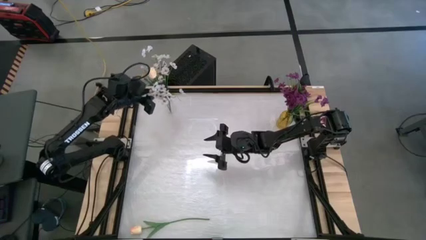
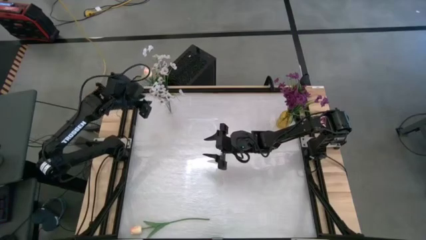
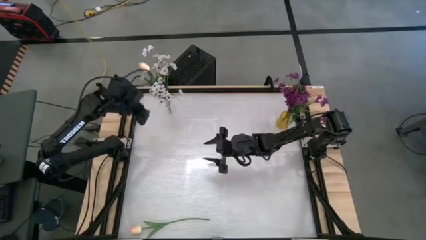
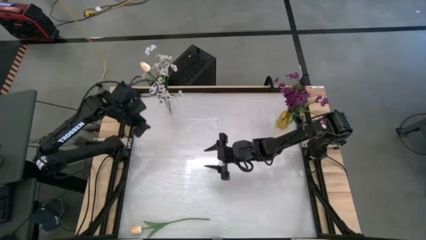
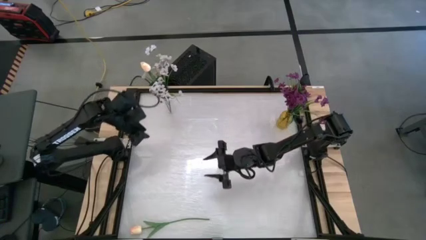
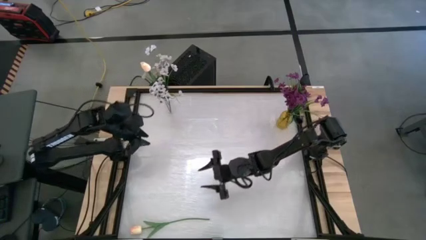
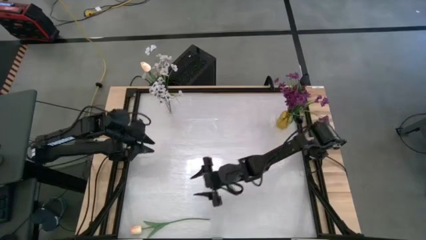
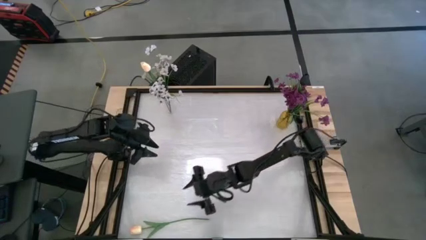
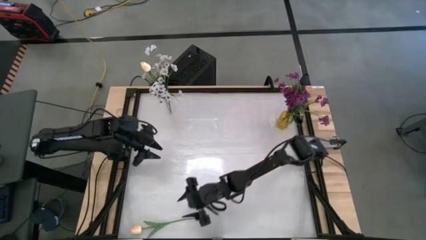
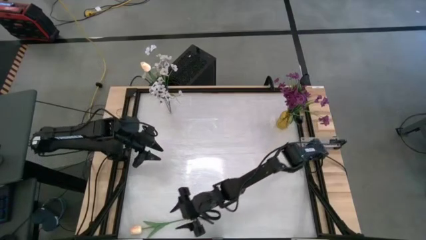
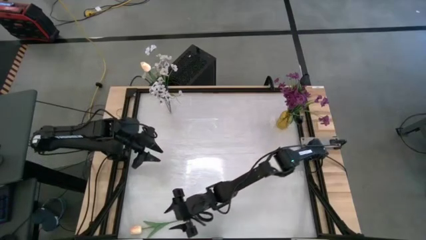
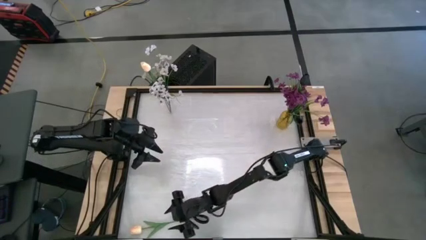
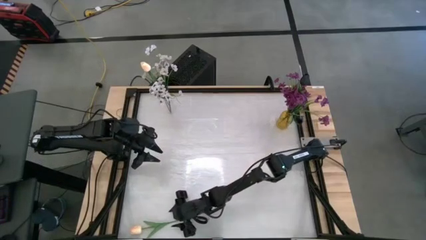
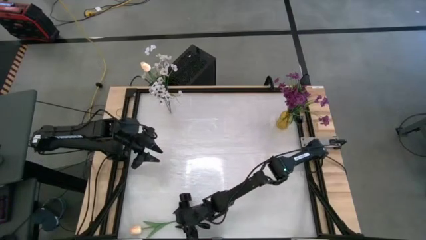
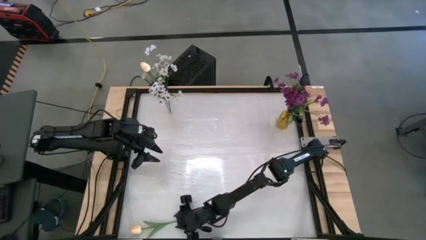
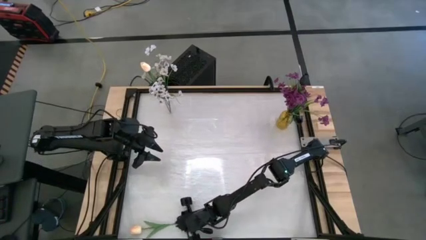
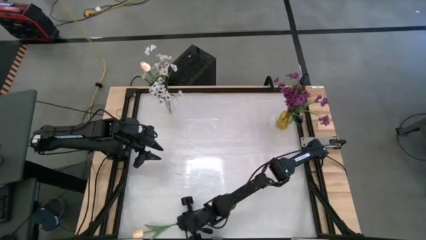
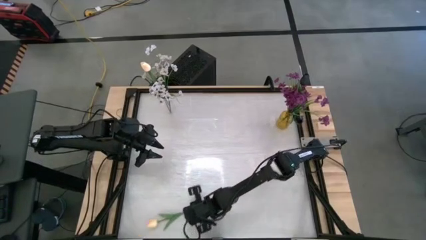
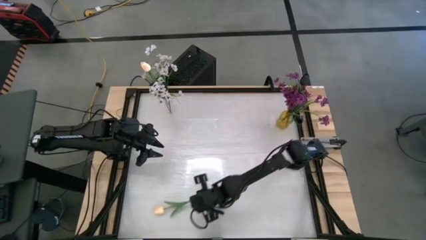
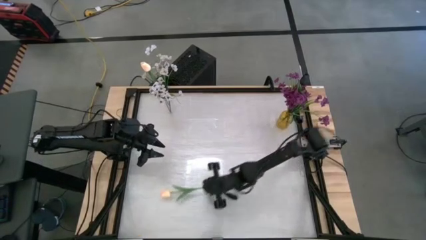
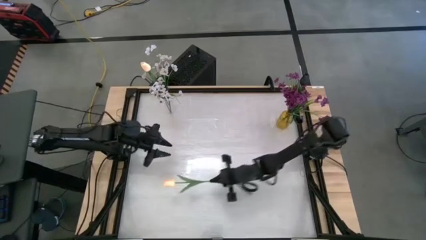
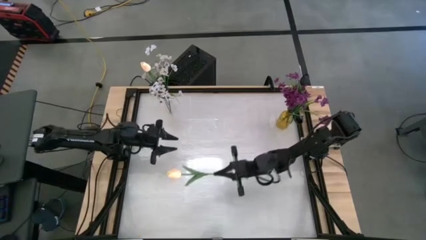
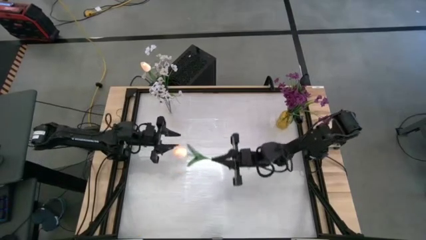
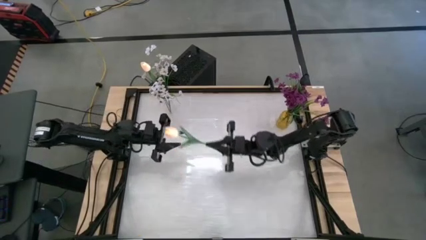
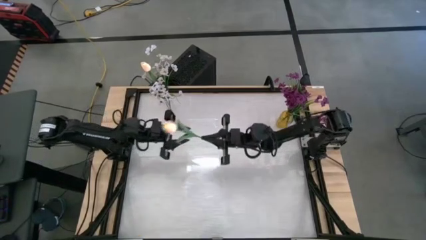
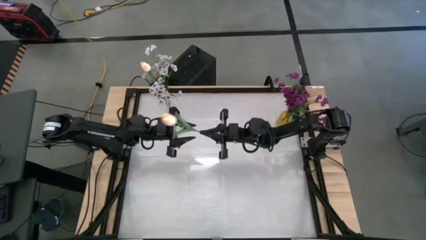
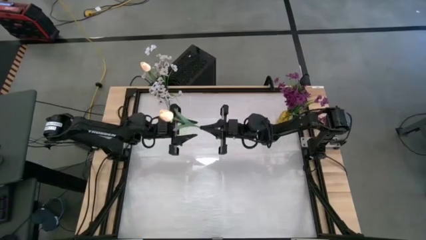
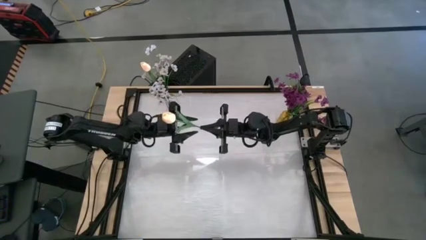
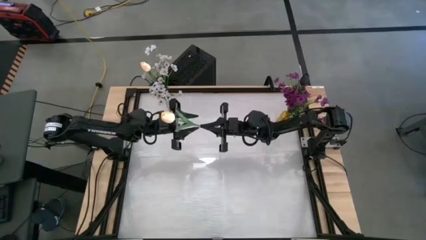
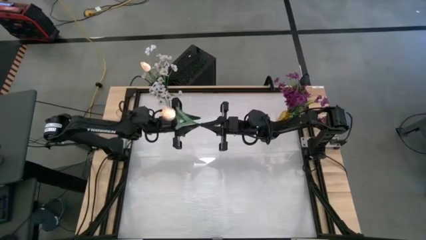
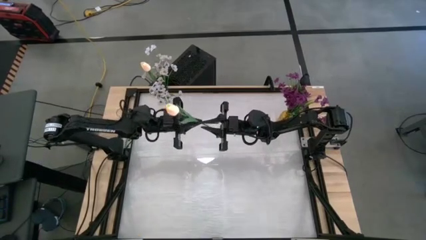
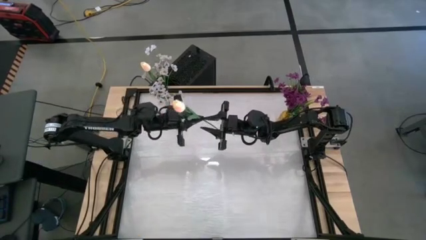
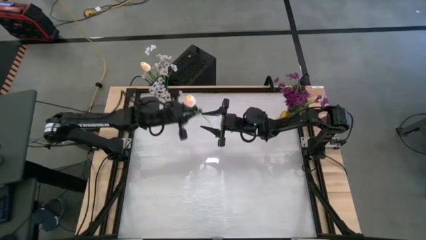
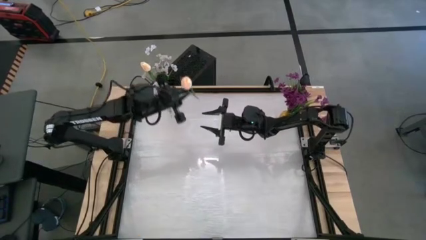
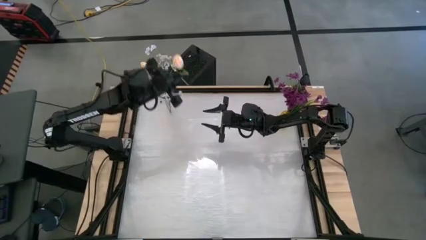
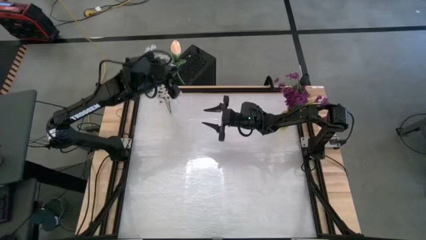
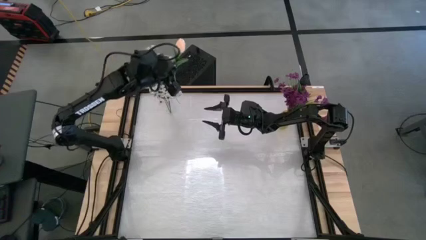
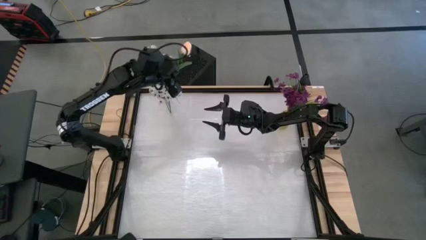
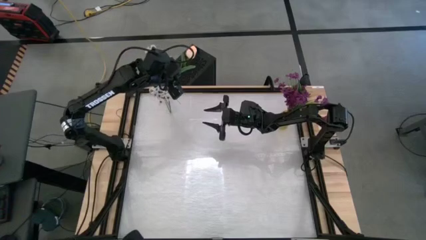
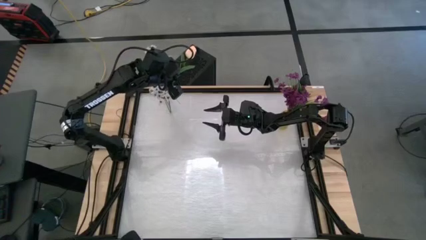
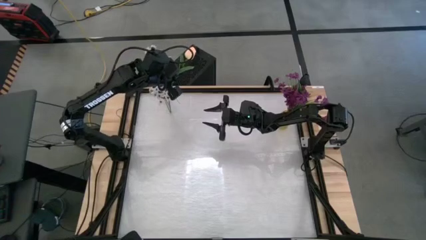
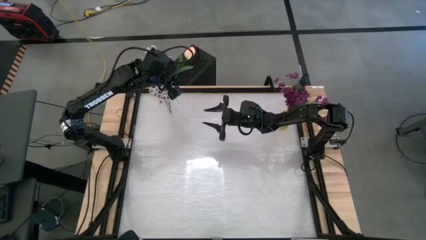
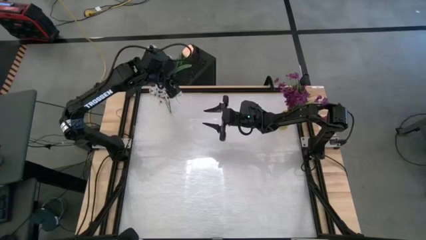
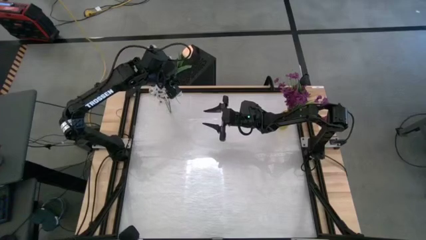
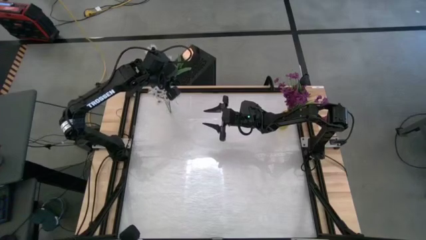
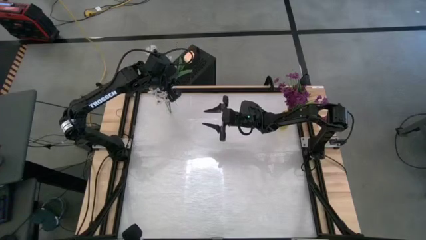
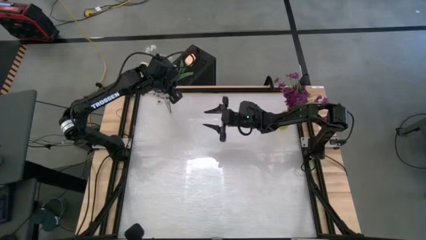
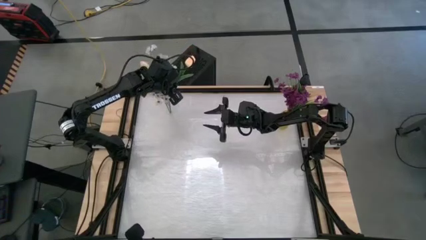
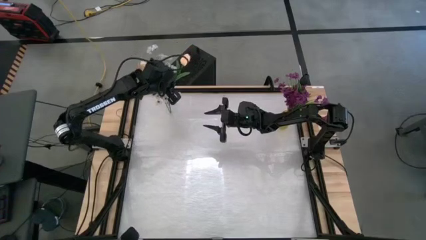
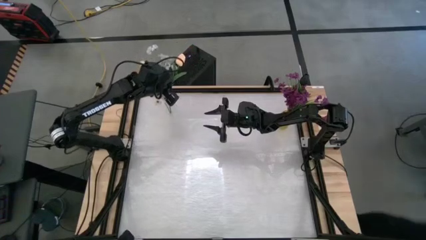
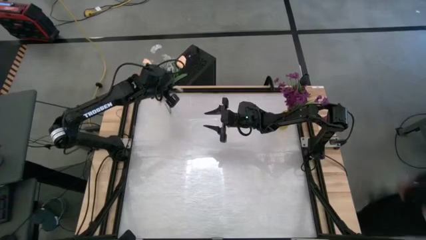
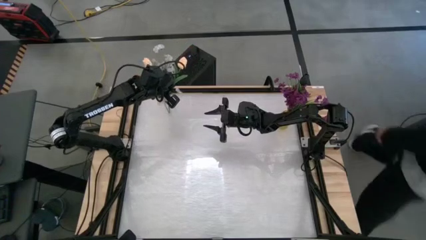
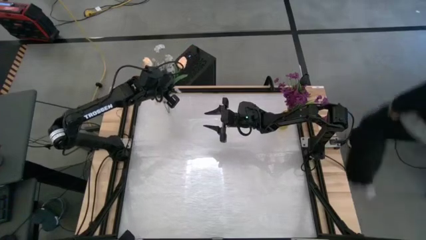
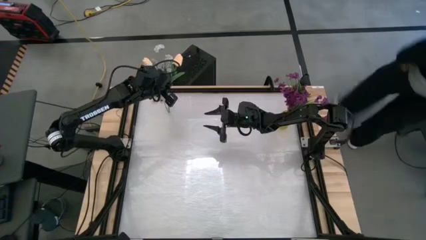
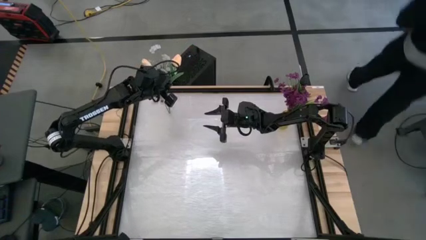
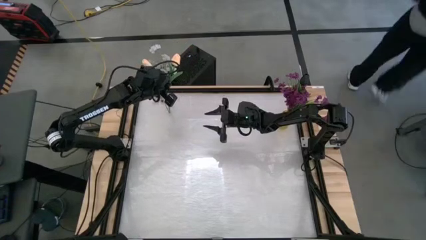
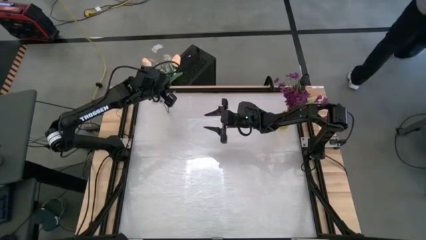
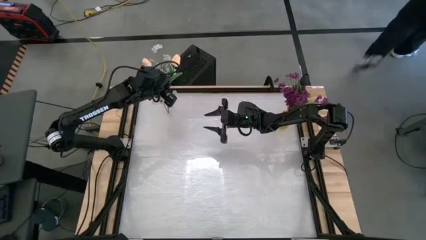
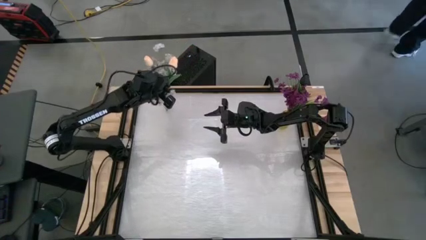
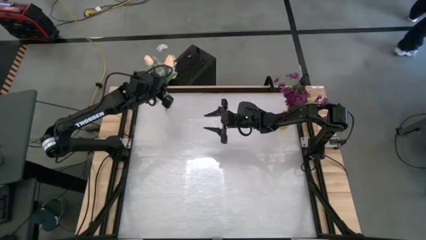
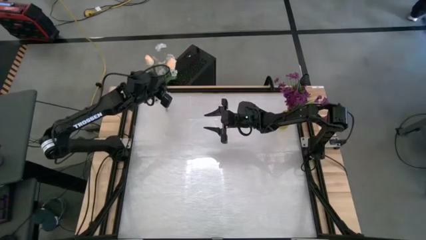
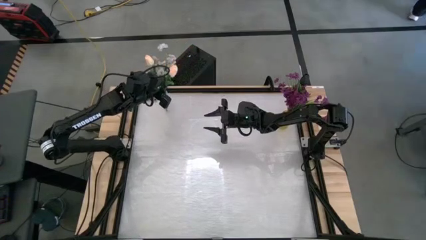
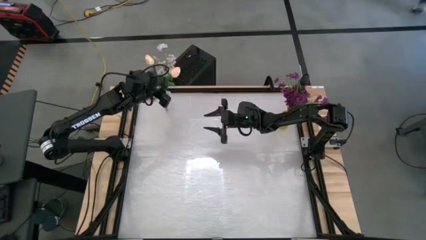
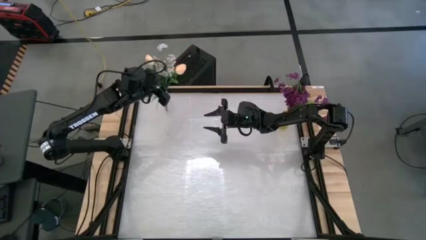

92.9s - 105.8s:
Task: Sort flowers into vase by color
Put the white tulip into the transparent vase

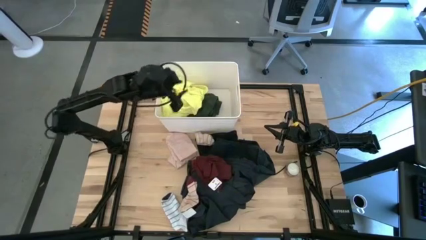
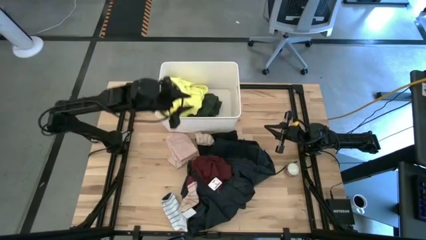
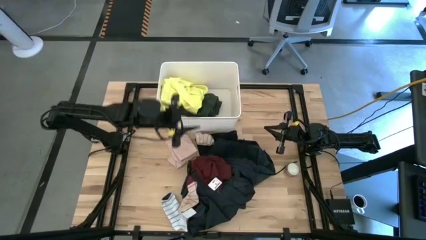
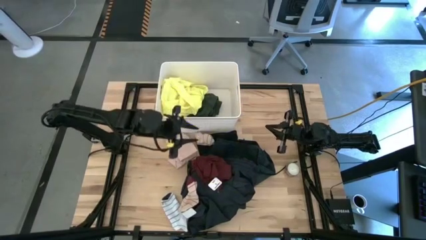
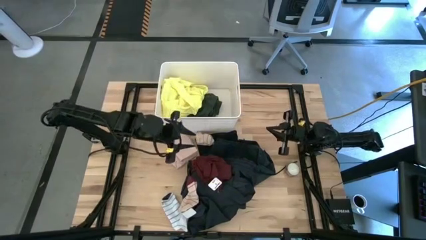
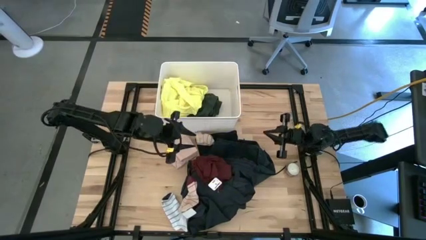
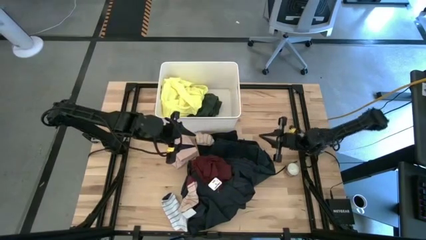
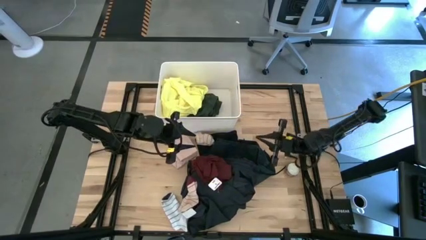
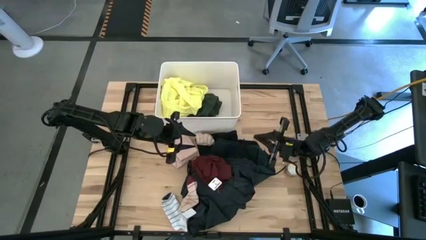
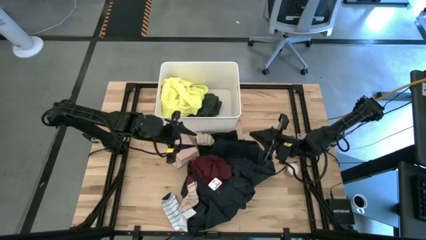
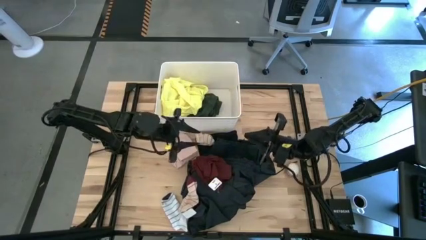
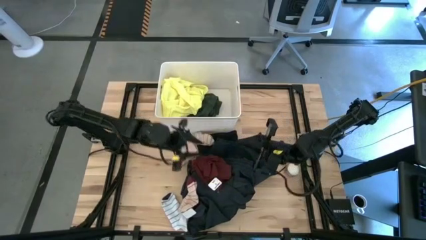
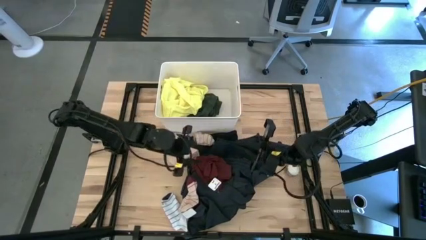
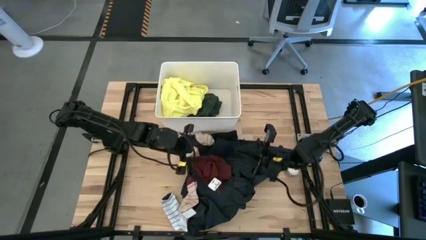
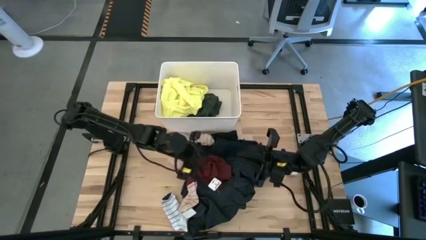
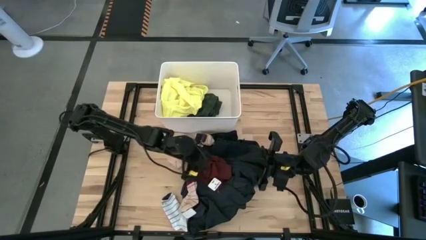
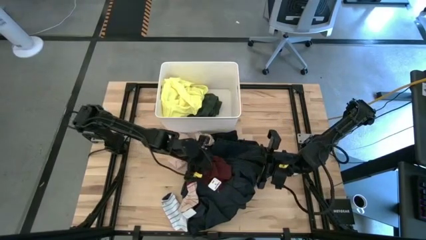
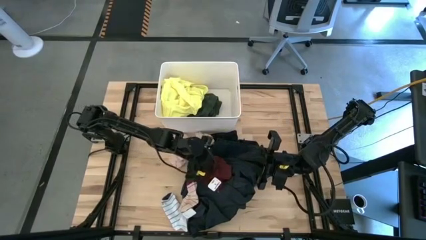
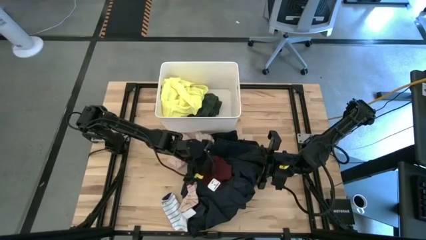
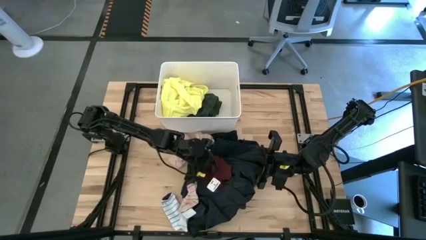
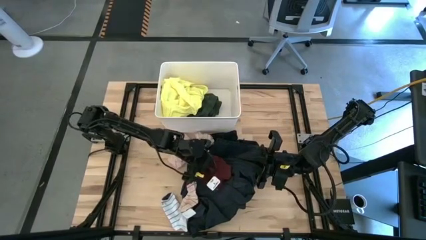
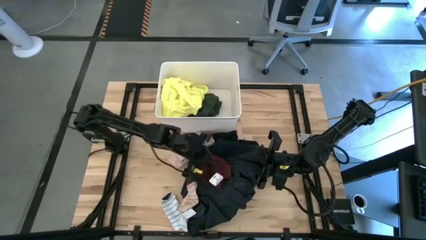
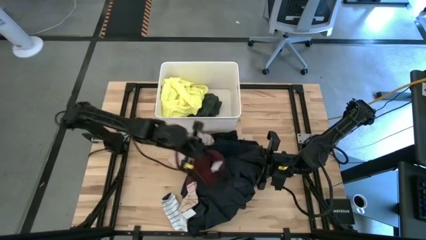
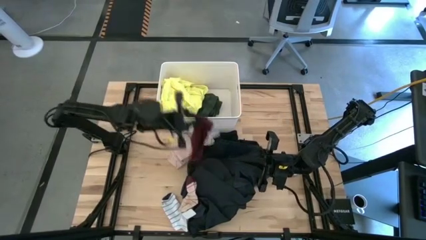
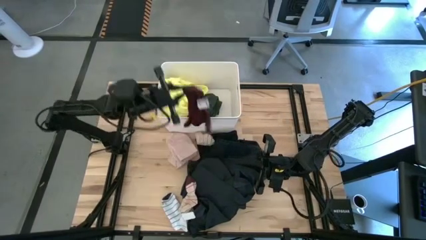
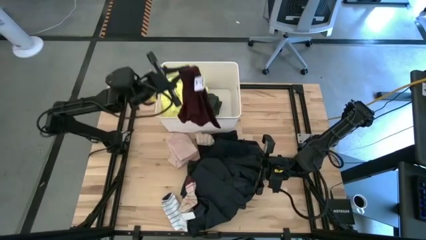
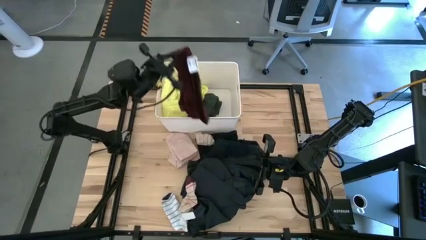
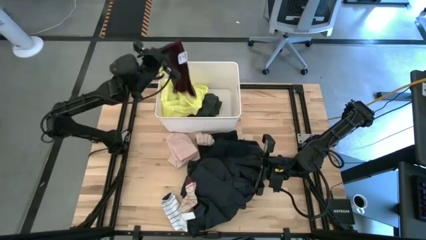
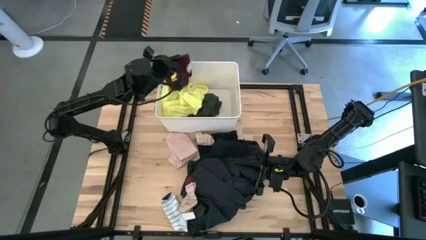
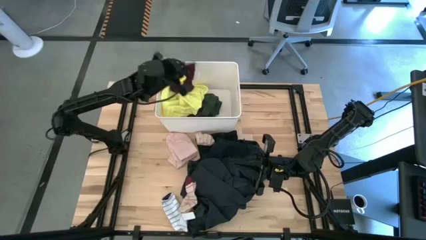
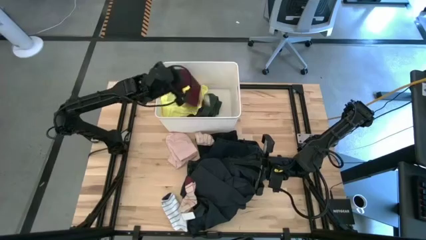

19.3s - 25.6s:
Task: Sort clothes
Put the red panty into the white laundry organizer
